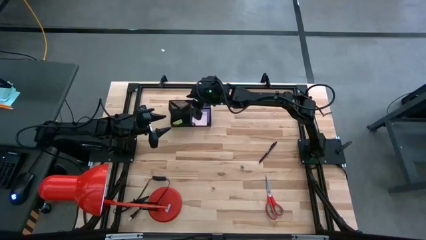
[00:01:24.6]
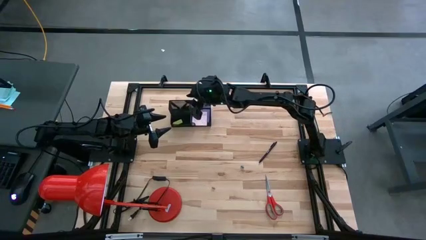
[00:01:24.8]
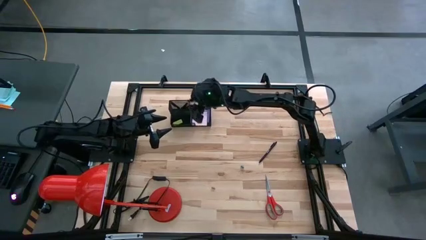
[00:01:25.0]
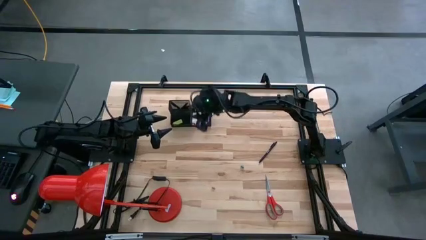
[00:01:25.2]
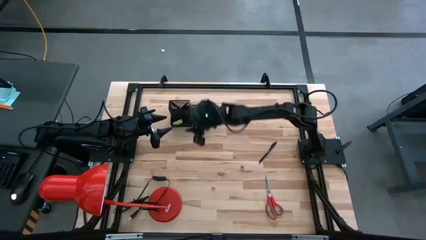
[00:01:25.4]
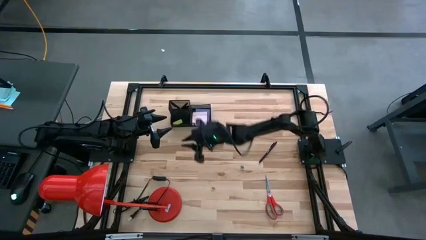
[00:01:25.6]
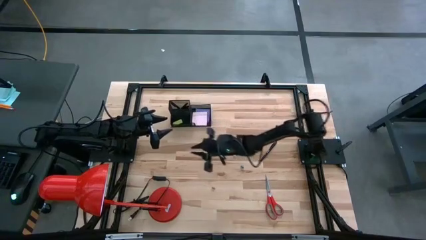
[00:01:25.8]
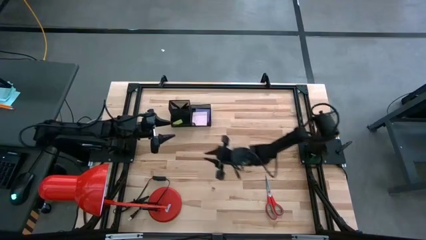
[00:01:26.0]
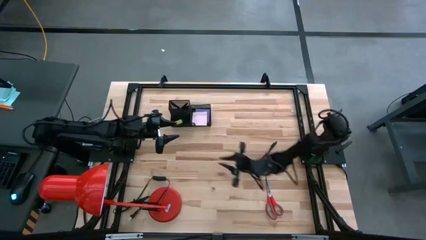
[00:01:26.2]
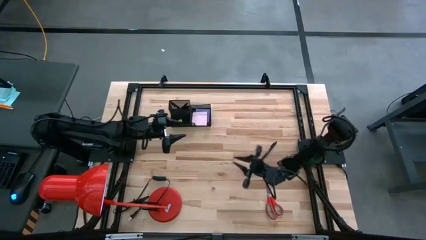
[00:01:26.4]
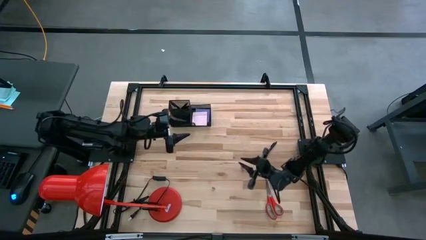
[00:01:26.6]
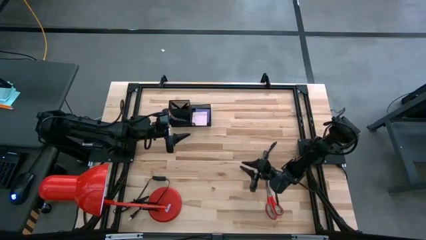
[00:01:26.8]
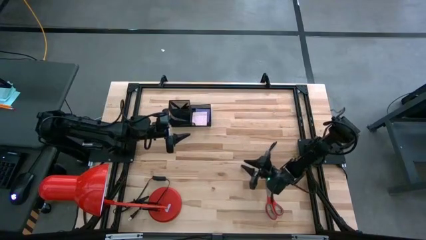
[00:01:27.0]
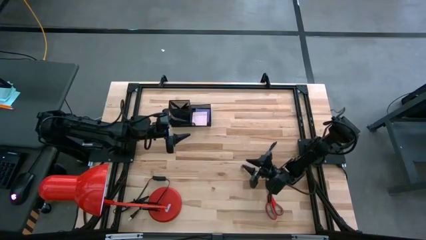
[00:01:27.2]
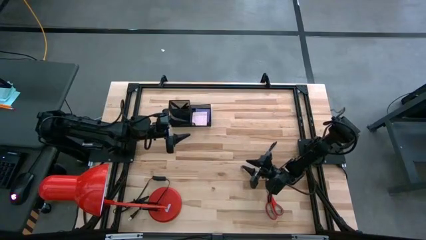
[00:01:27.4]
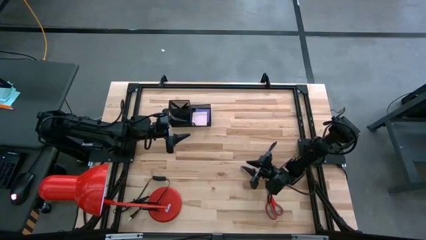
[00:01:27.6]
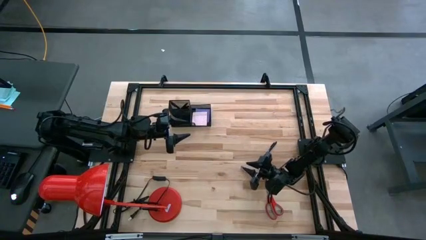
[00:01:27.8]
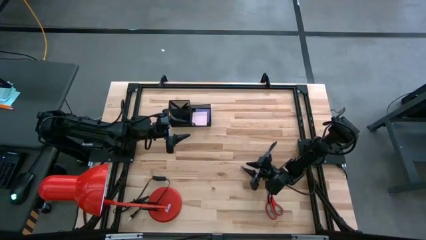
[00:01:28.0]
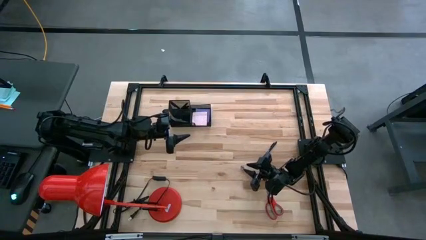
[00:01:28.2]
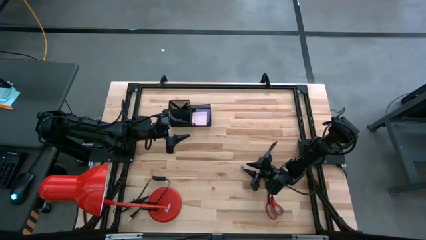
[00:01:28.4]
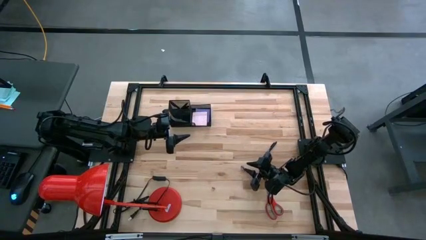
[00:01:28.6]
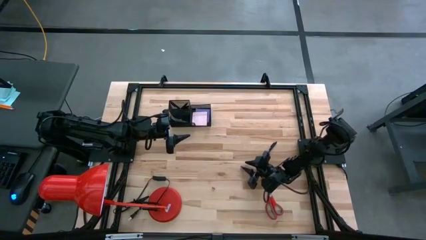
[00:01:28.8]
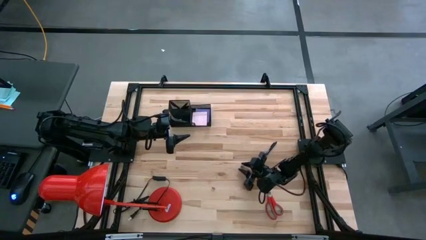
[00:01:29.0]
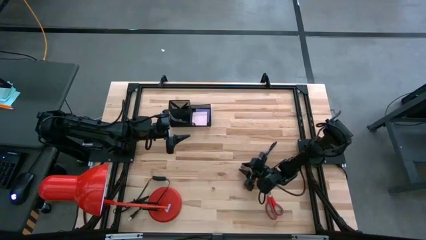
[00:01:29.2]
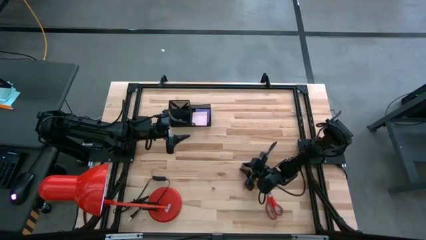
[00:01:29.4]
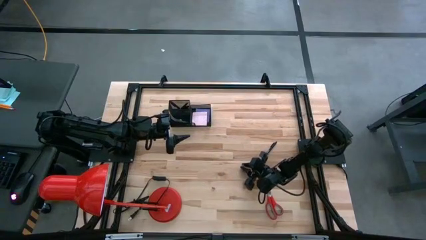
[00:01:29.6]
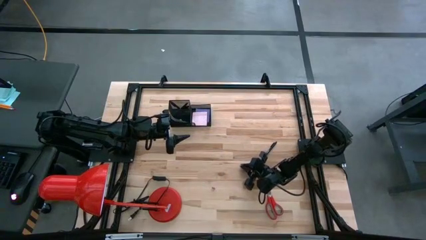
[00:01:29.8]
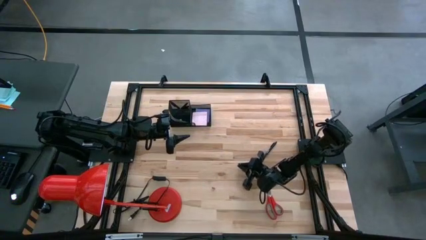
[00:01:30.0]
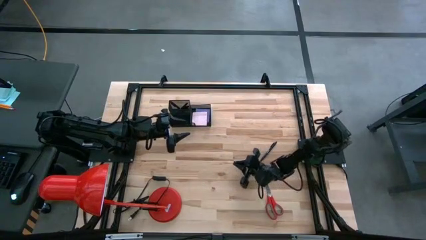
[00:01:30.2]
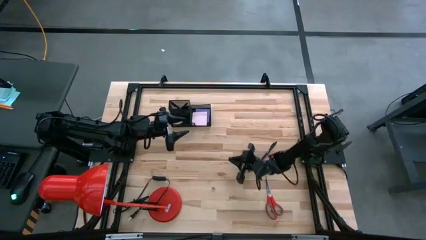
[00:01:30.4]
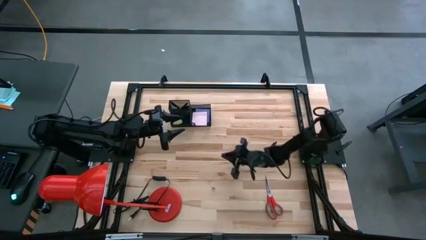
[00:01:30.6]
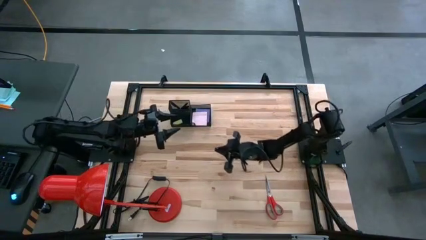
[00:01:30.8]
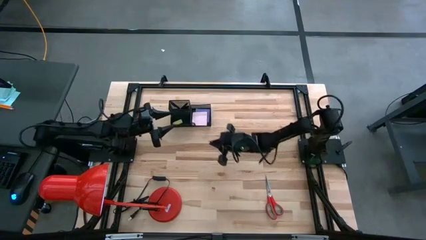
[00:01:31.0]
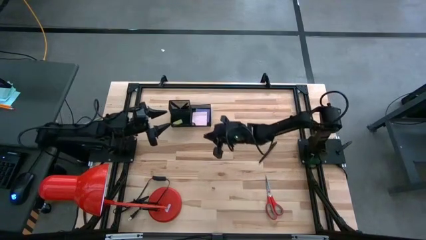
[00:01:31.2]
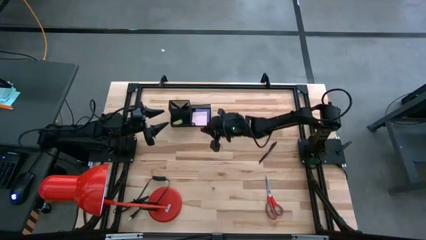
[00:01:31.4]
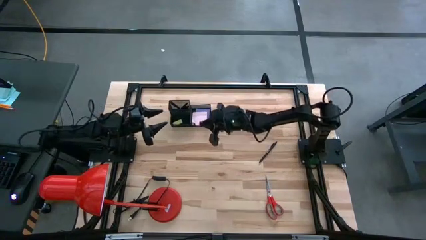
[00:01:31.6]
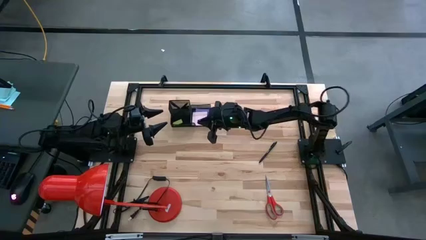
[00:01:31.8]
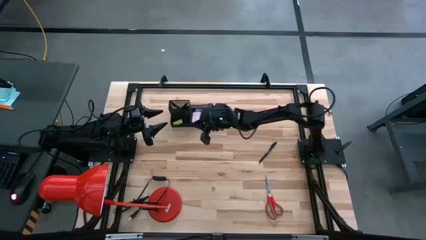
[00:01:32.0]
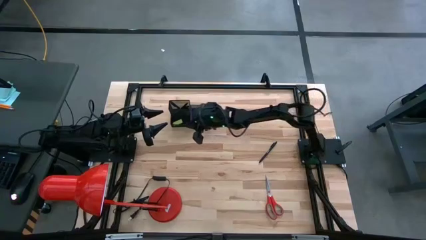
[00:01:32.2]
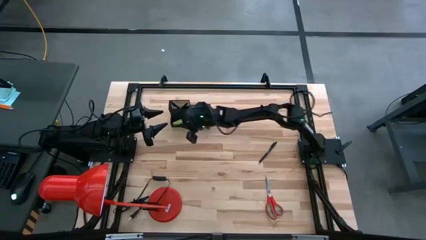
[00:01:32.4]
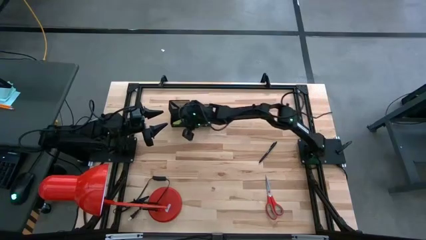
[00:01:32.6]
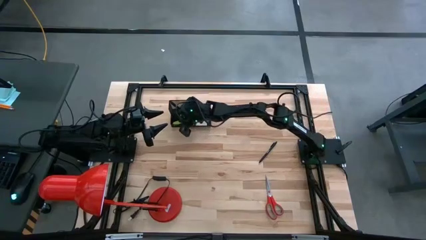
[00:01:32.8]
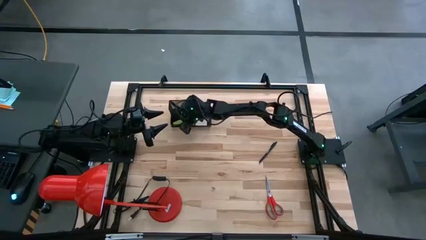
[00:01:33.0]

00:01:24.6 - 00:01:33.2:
Task: Pick and place office supplies into organizer
Put the blue binder clip into the desk organizer

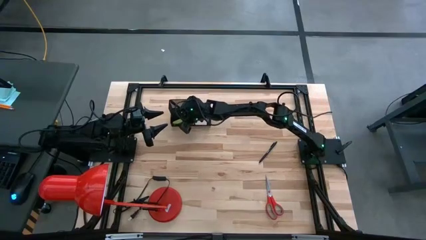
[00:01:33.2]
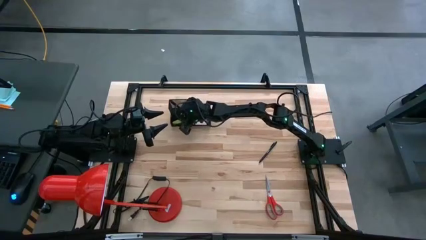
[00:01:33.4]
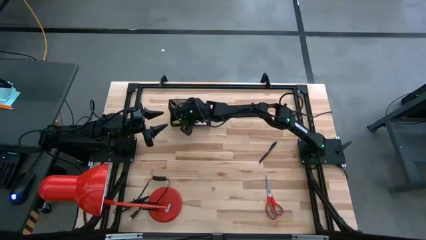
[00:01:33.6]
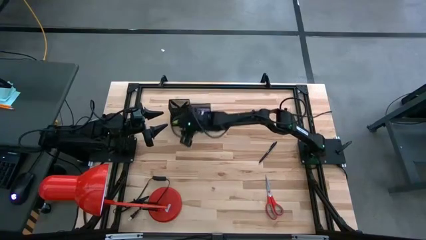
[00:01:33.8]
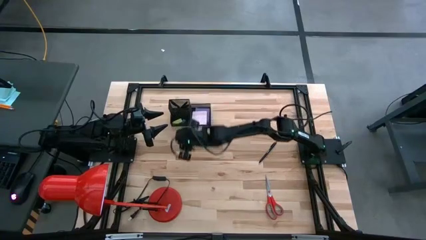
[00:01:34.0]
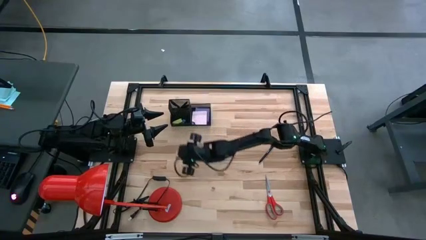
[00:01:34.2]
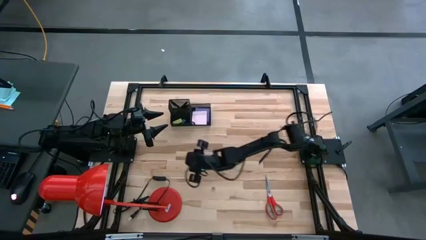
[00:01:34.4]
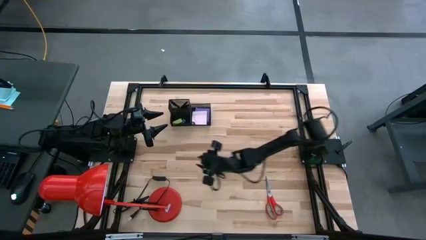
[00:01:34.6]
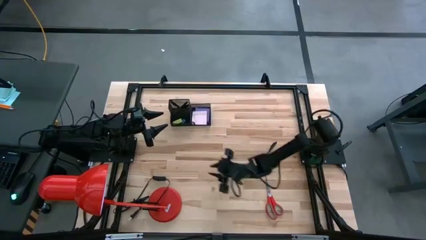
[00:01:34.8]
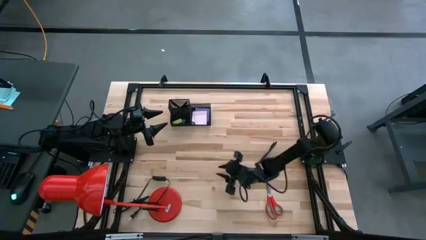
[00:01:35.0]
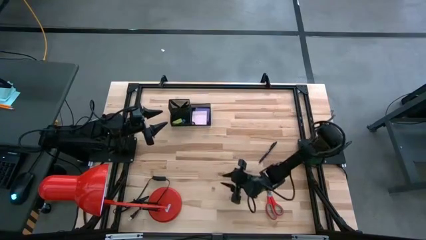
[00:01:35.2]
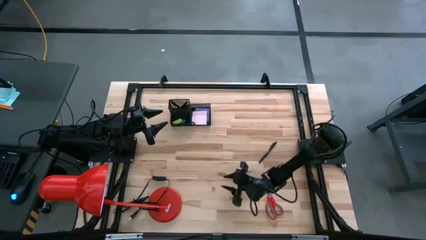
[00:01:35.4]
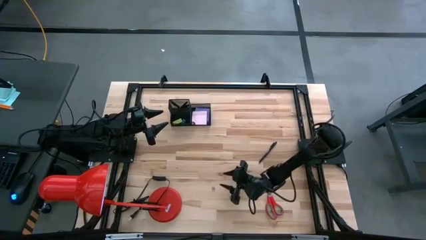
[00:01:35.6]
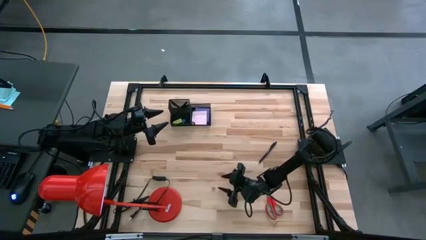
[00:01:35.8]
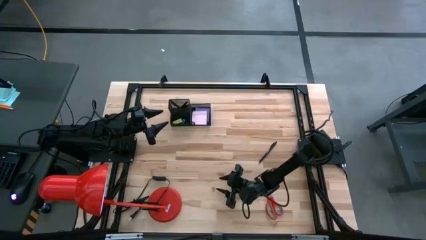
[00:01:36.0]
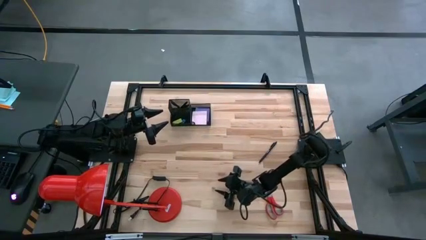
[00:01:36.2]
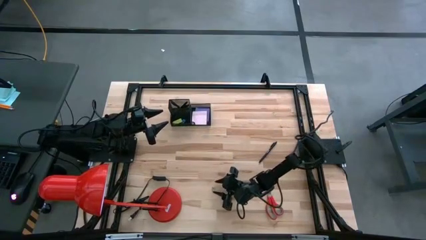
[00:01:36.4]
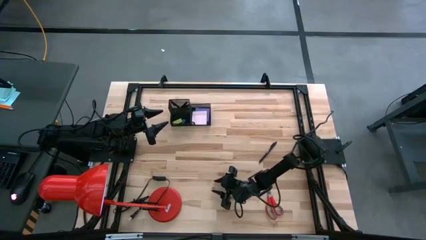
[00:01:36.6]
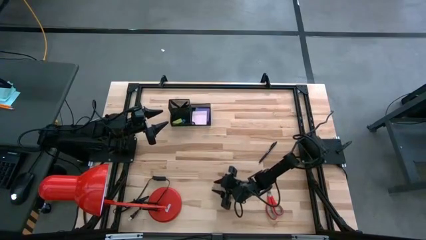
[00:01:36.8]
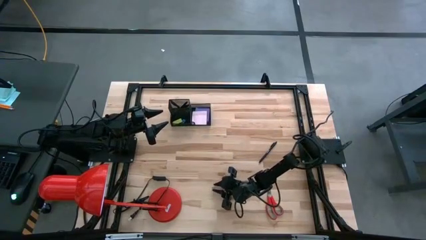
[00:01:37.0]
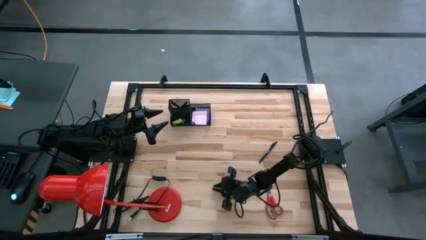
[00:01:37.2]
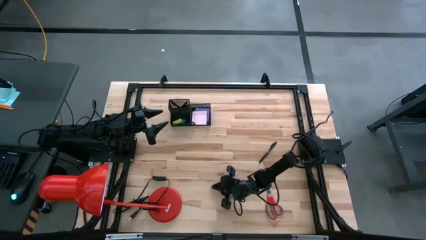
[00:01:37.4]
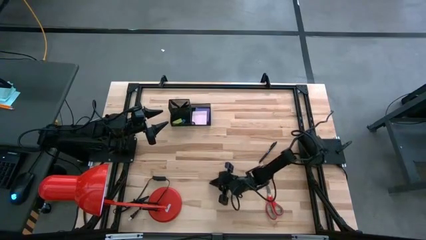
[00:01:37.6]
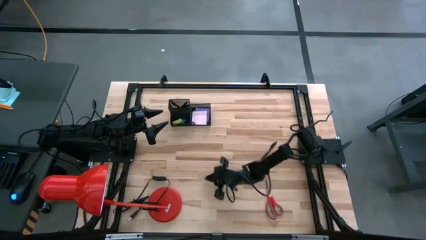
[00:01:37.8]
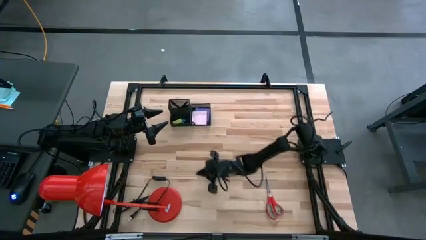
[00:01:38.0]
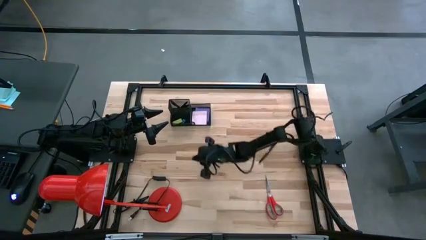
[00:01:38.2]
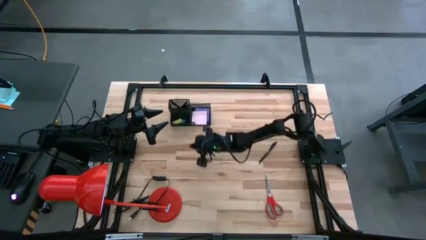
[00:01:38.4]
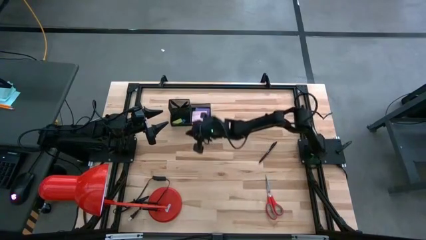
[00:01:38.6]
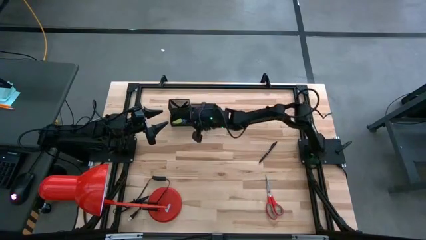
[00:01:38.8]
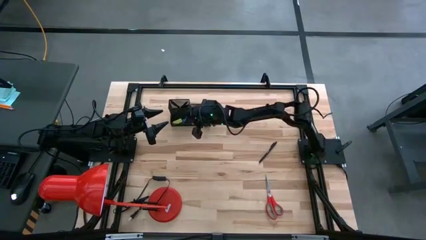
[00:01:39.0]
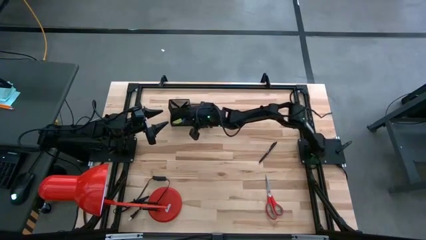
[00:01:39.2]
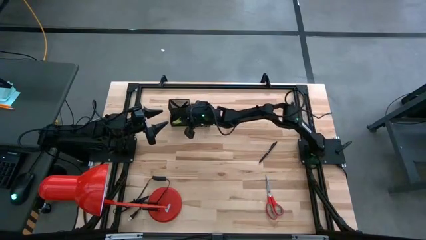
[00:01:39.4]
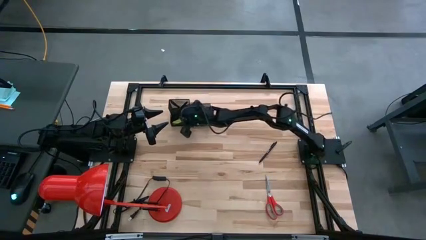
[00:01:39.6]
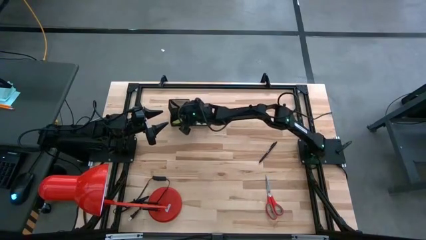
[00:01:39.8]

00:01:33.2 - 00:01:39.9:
Put the pink binder clip into the desk organizer

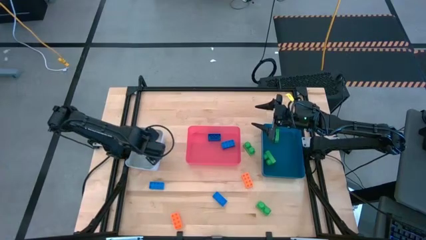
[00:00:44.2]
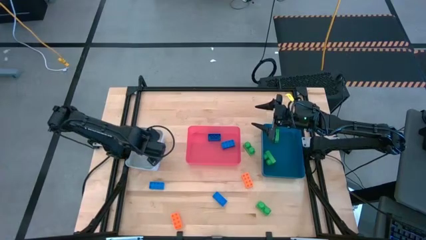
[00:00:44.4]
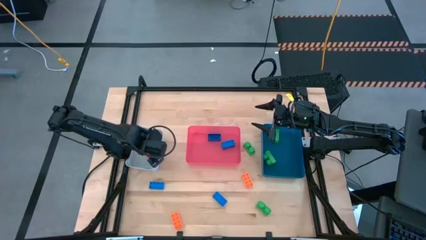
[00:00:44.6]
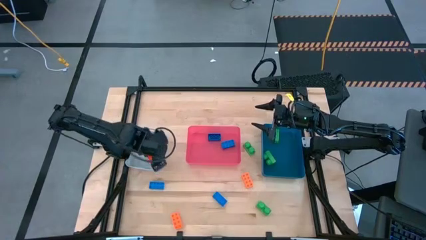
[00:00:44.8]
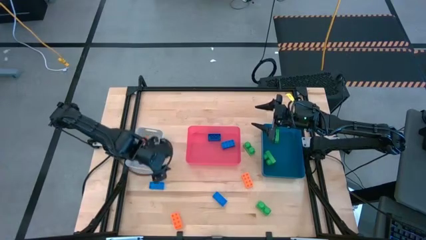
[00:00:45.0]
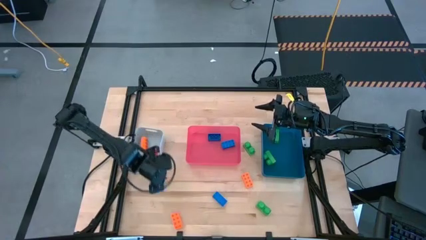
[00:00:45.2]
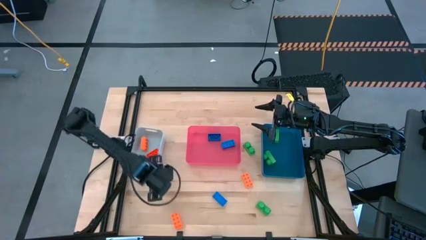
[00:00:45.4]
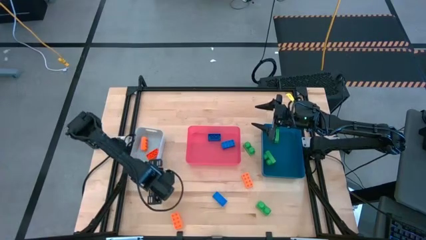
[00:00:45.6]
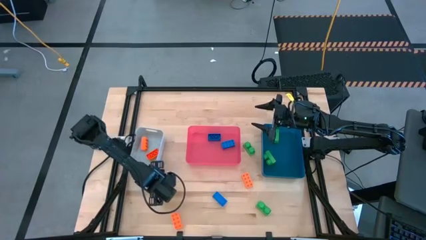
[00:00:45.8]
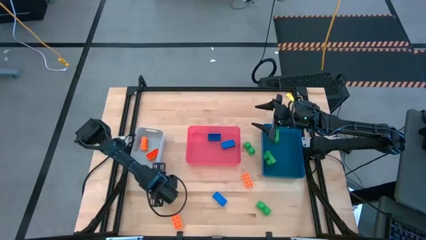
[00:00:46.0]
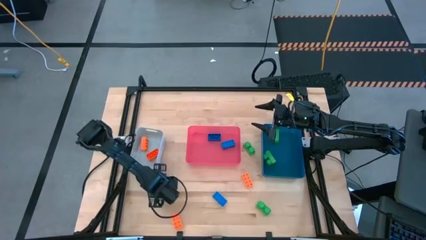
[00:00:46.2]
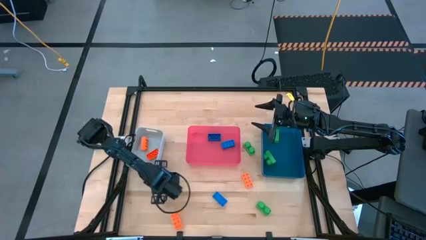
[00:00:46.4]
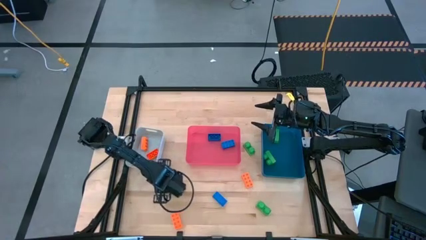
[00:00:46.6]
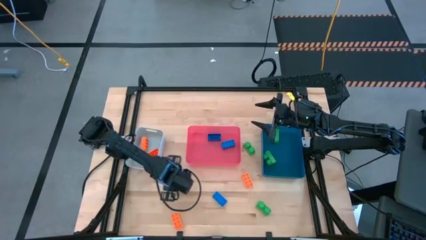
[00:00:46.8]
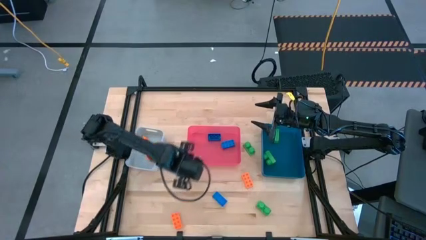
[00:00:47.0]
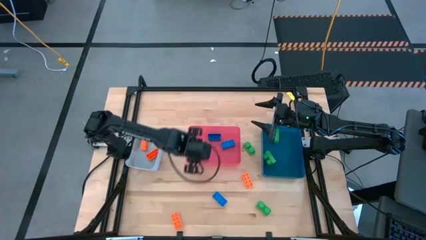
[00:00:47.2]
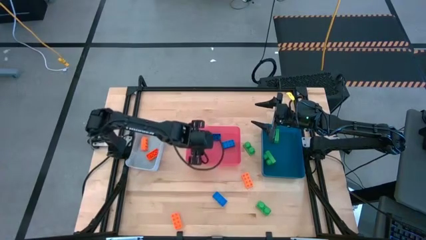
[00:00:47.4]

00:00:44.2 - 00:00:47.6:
Task: Sort & place blocks by color
Put the blue game piece into the red bin
